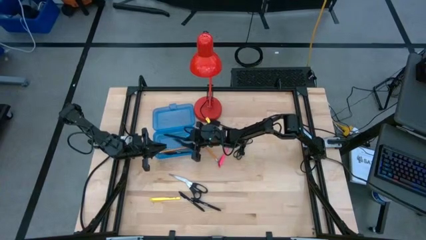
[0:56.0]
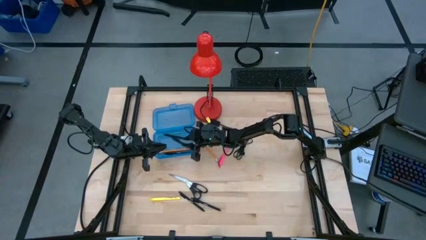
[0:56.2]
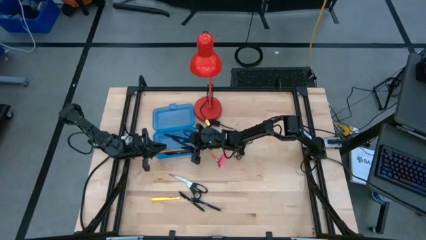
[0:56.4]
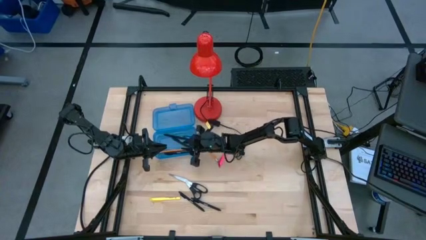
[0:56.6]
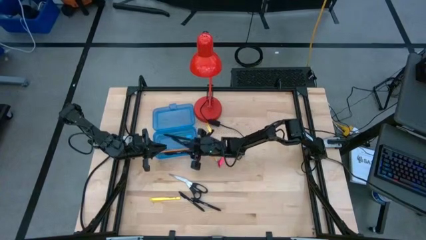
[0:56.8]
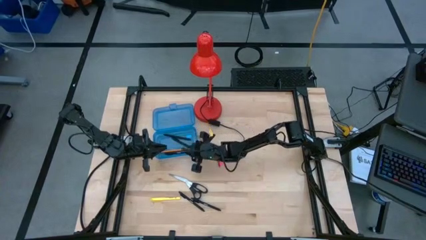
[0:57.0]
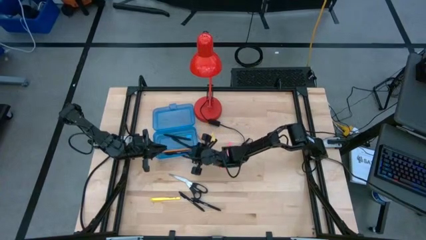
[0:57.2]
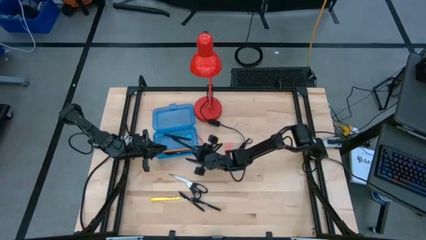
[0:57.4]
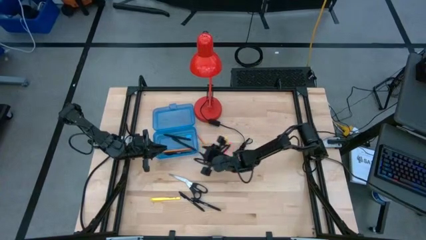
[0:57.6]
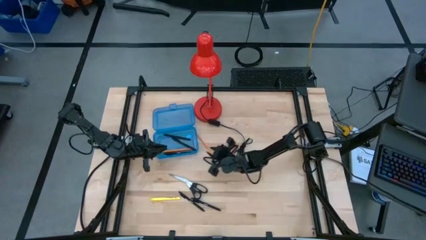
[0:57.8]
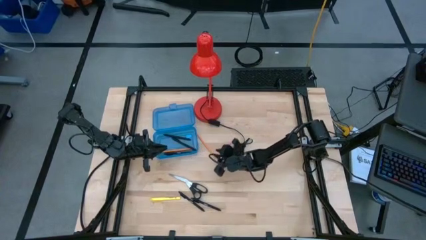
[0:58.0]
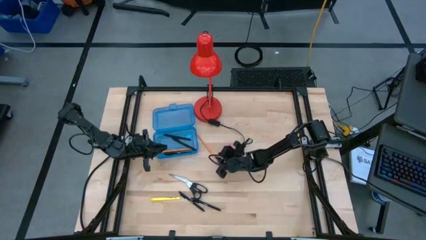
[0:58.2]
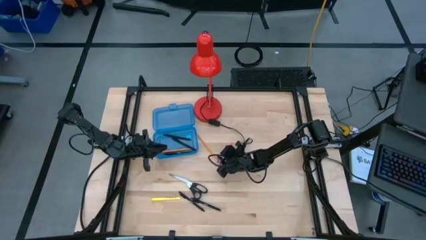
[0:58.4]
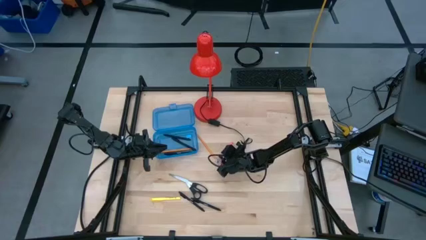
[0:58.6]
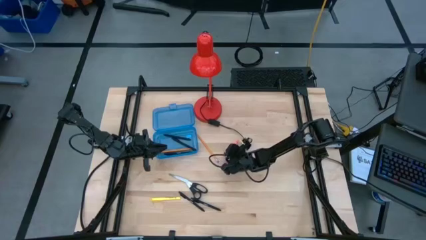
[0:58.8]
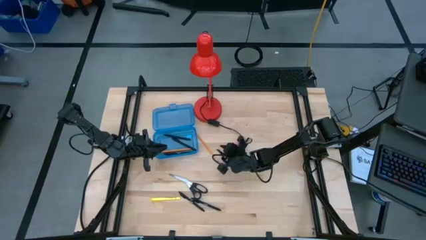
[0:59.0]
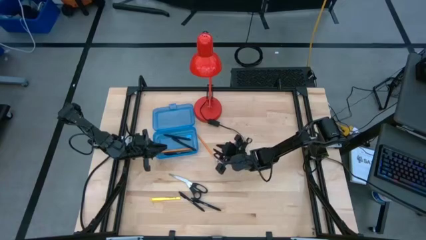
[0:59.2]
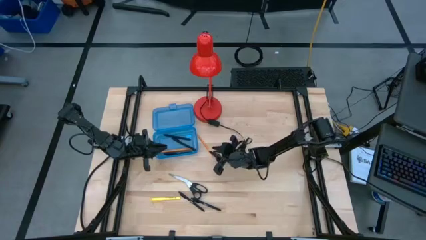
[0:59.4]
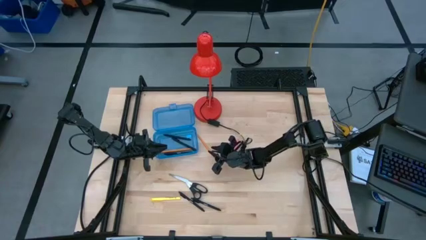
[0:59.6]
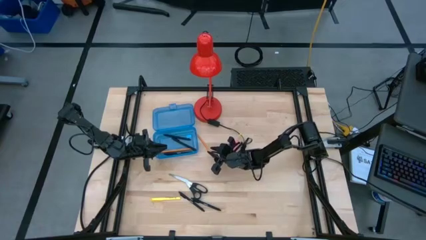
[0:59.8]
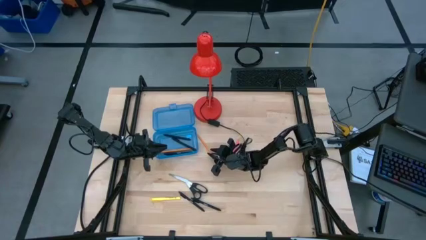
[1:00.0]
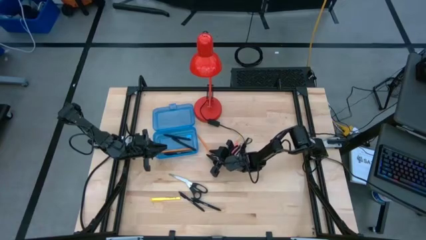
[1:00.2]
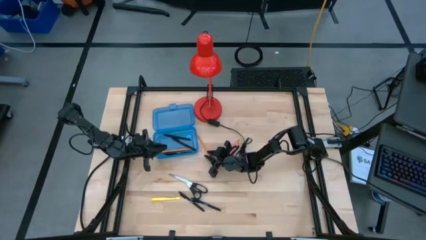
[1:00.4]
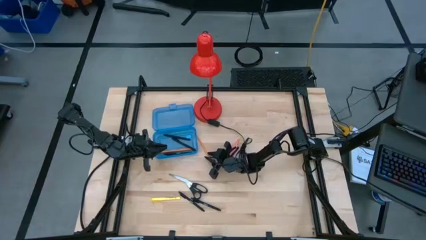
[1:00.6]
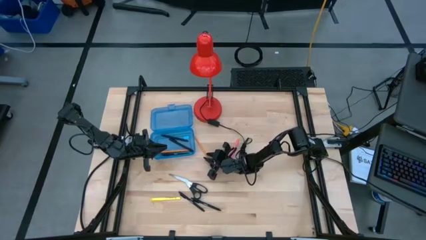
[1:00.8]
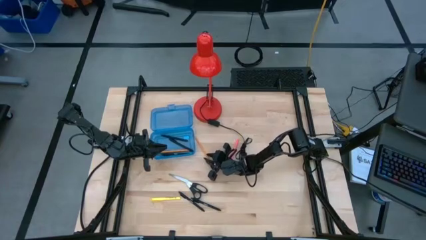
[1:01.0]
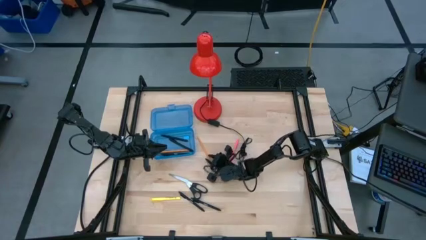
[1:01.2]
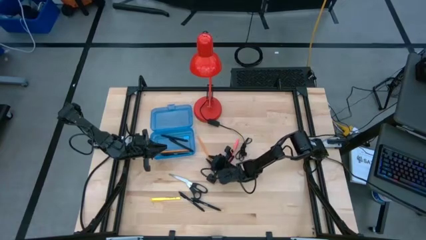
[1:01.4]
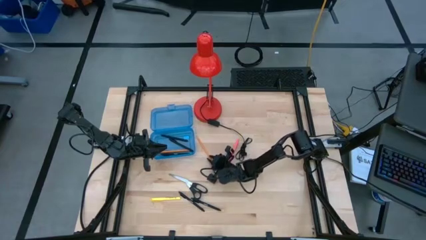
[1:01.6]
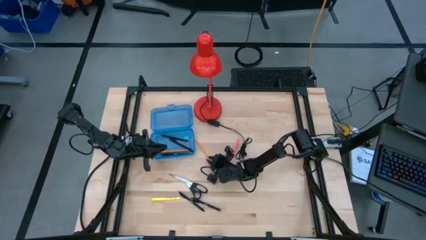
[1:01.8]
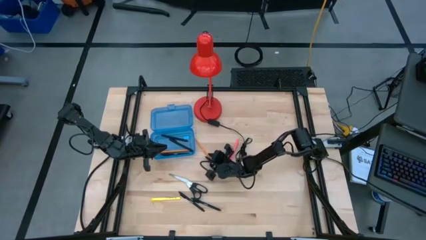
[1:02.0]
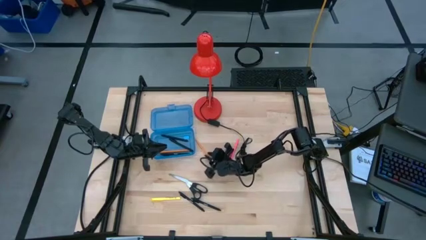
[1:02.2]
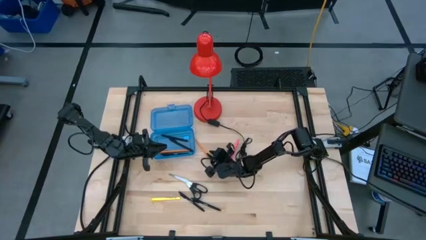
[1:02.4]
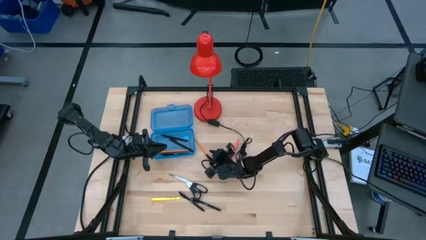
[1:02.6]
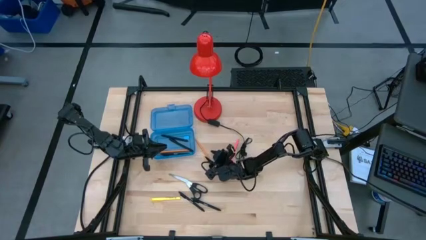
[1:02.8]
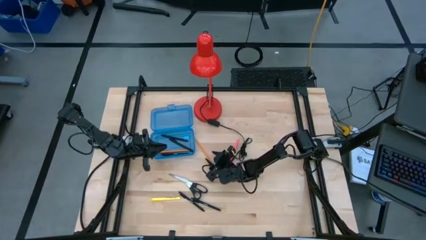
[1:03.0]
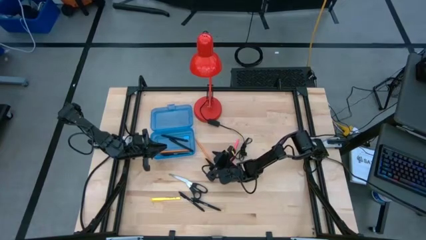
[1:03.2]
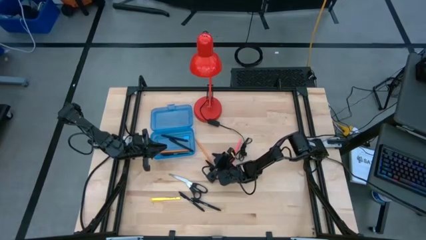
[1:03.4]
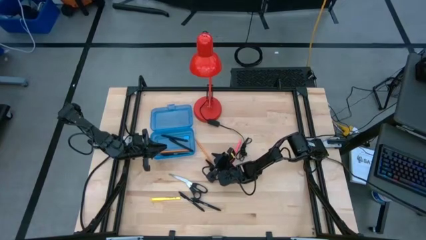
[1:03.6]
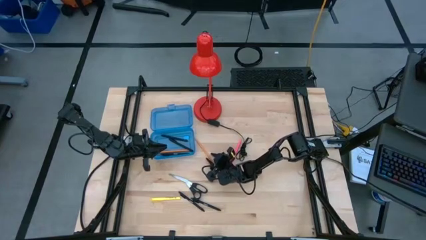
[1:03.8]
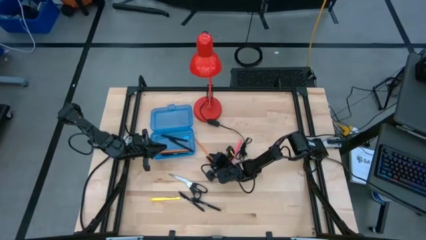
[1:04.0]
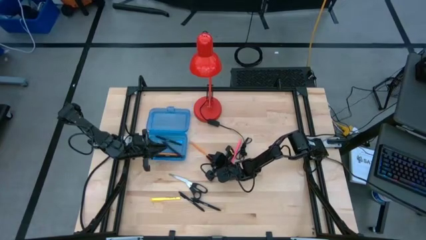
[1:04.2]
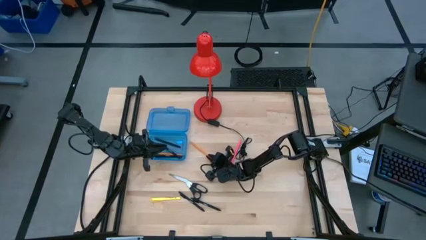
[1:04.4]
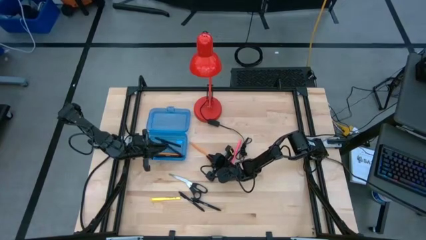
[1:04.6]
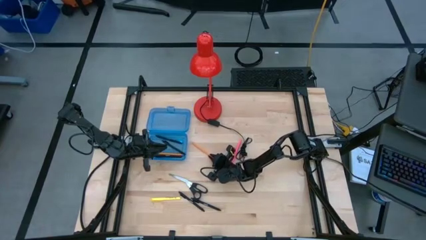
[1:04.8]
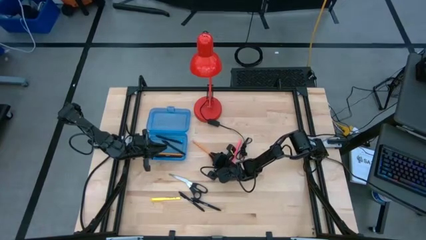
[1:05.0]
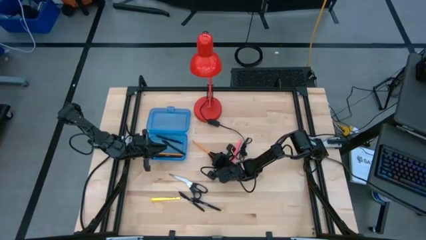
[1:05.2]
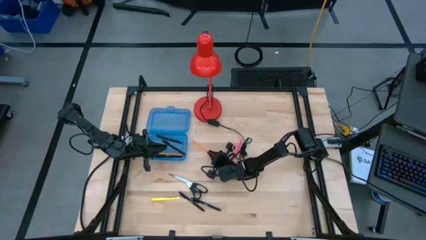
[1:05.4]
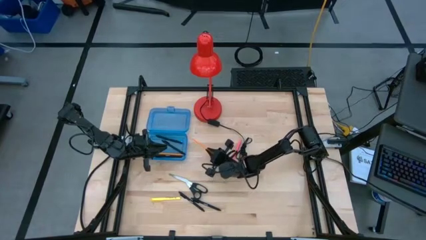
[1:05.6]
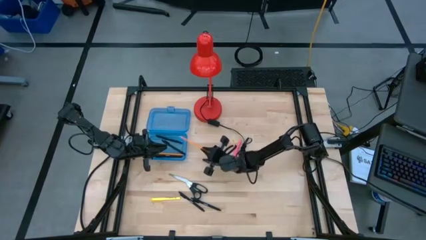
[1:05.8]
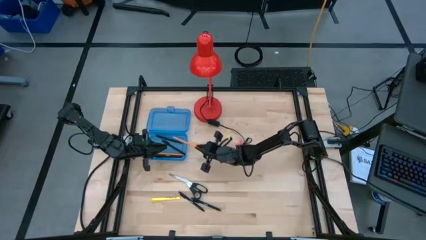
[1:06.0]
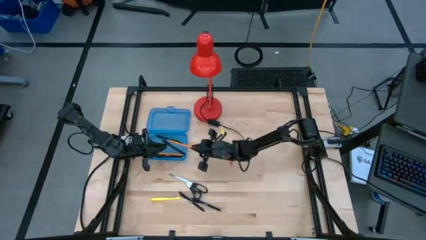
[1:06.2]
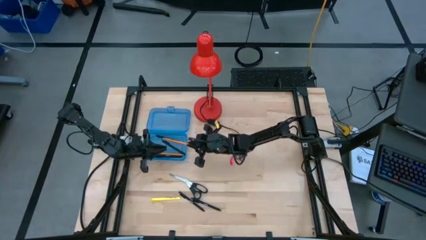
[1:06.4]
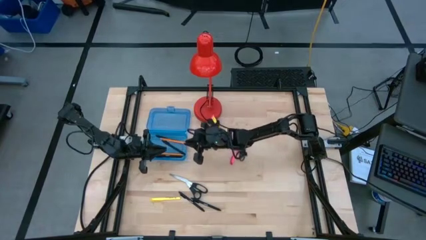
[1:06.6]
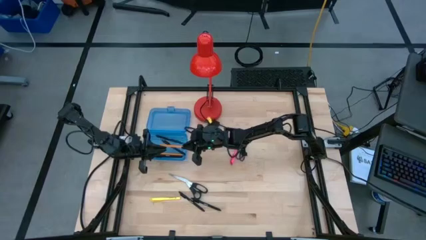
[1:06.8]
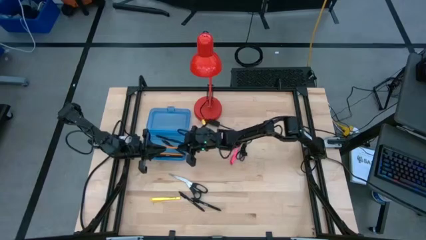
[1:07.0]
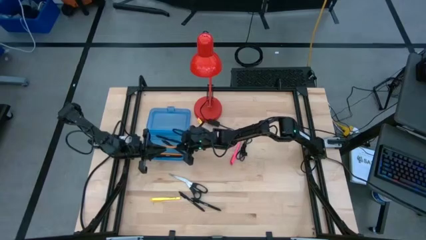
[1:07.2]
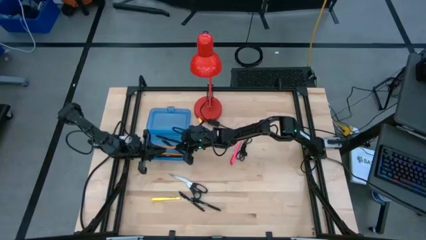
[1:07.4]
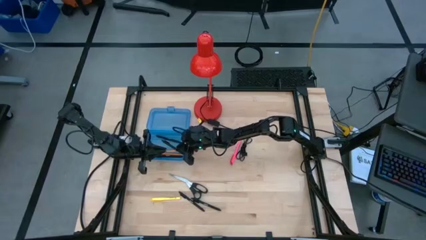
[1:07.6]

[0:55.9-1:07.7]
Task: Pick & place school supplies into a supply box
Put the orange pencil into the blue supply box
